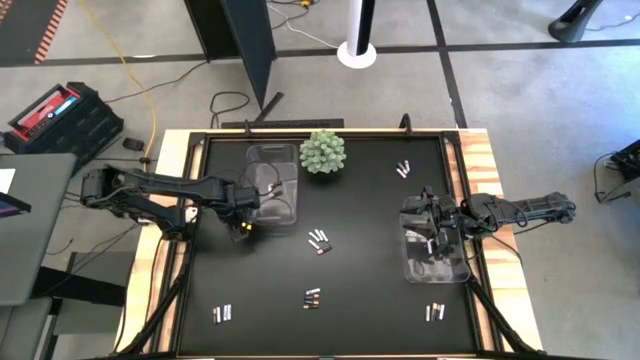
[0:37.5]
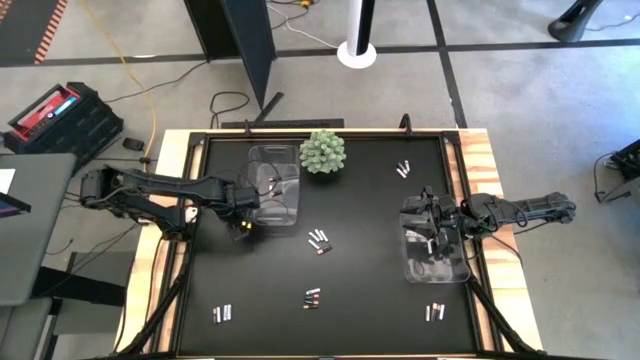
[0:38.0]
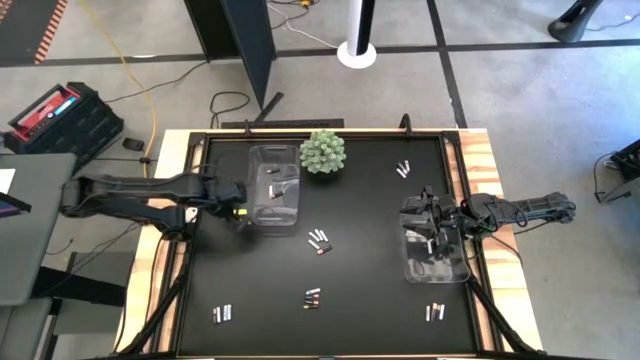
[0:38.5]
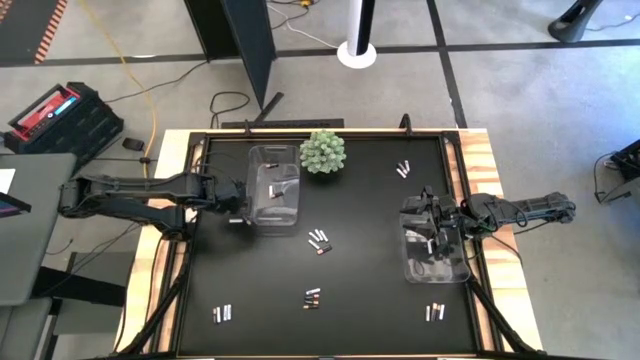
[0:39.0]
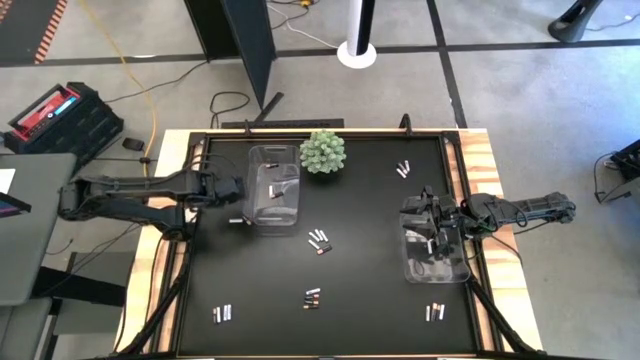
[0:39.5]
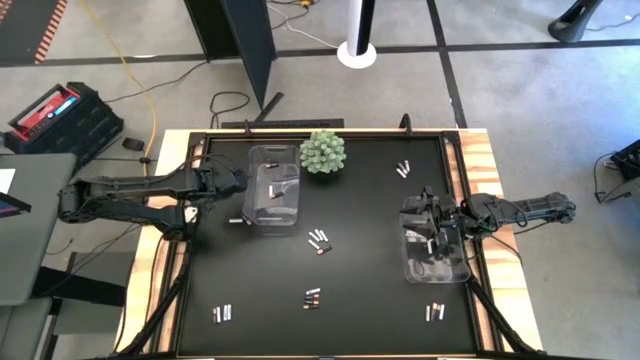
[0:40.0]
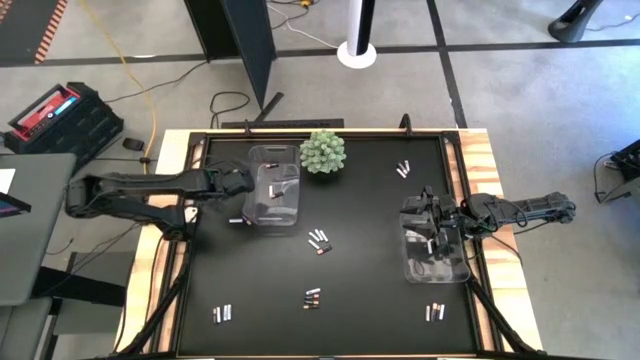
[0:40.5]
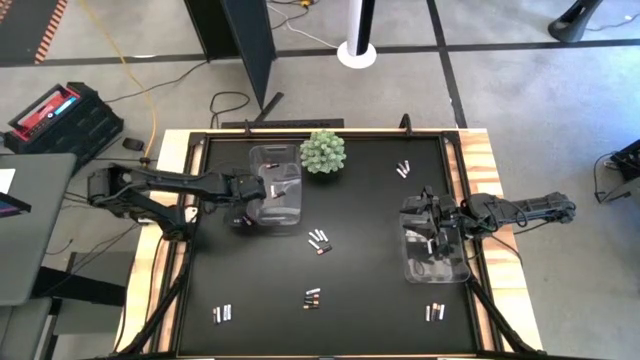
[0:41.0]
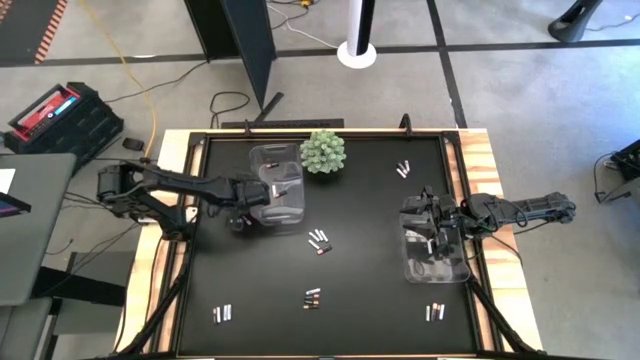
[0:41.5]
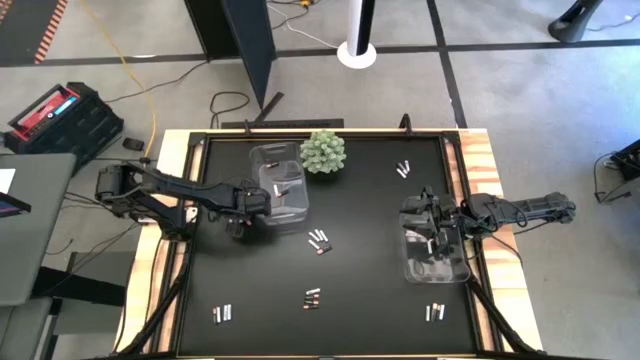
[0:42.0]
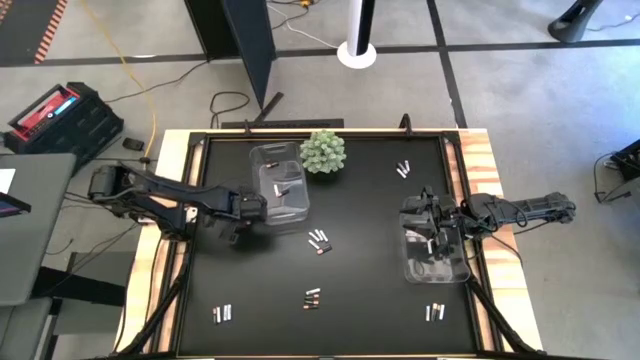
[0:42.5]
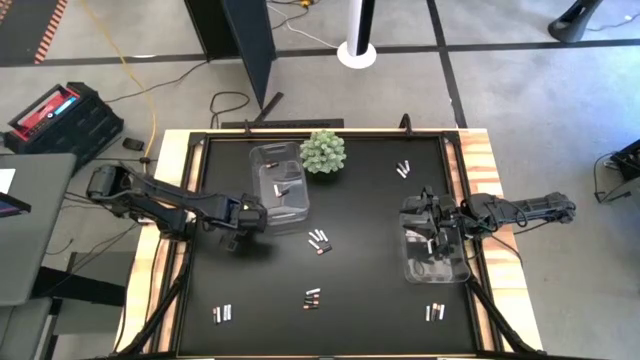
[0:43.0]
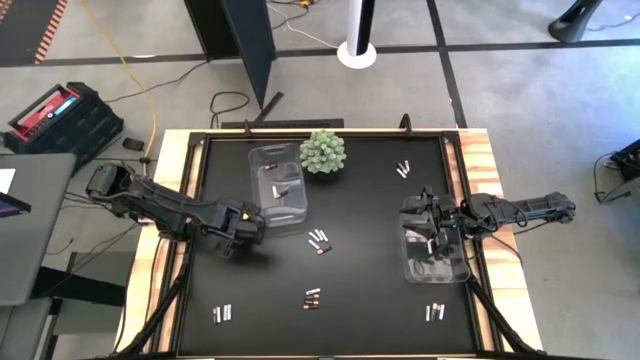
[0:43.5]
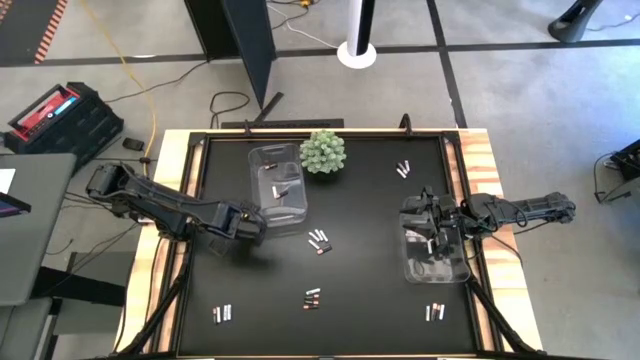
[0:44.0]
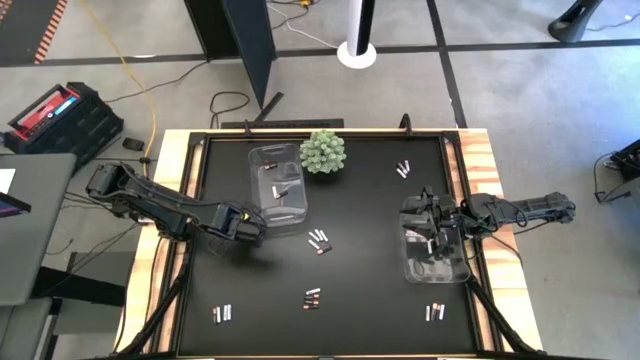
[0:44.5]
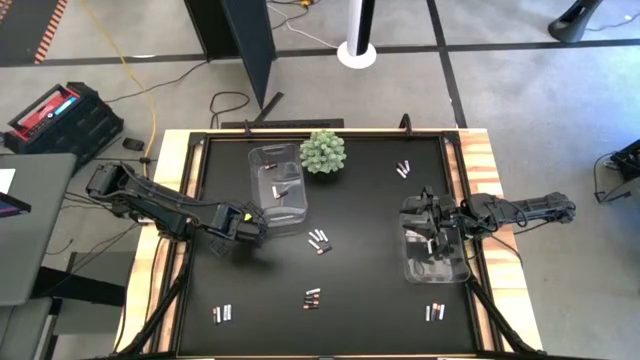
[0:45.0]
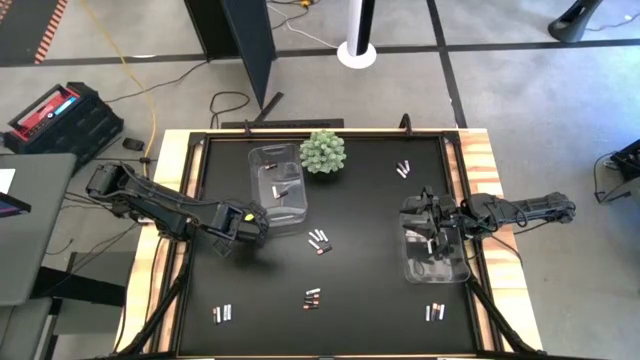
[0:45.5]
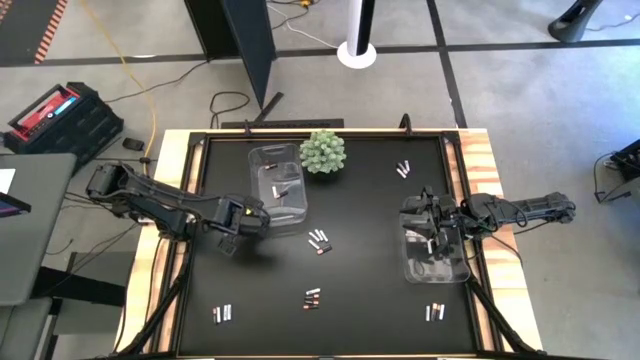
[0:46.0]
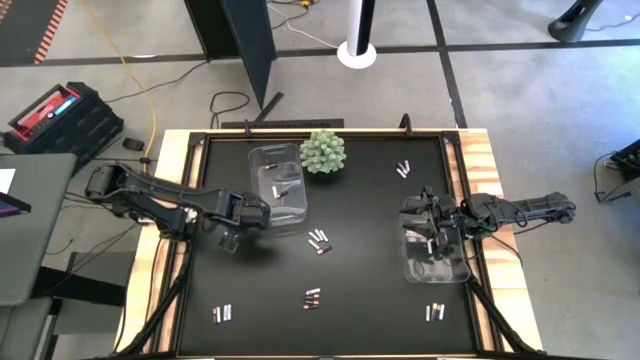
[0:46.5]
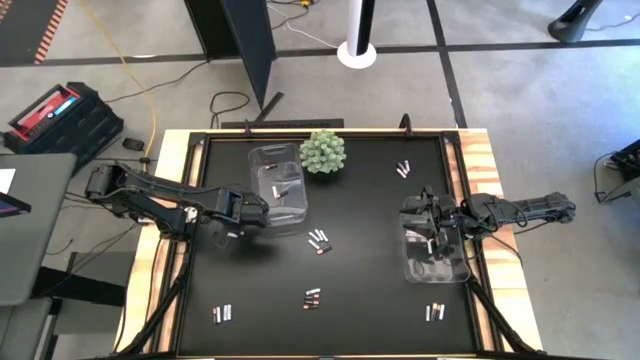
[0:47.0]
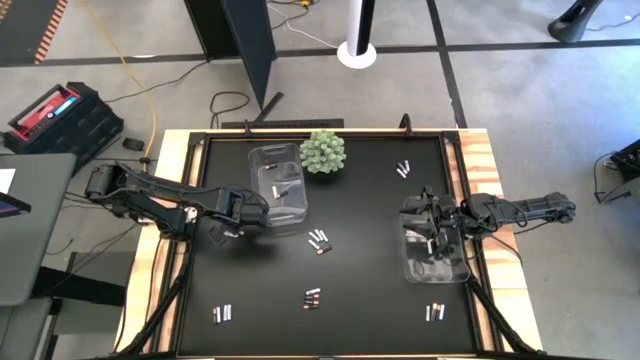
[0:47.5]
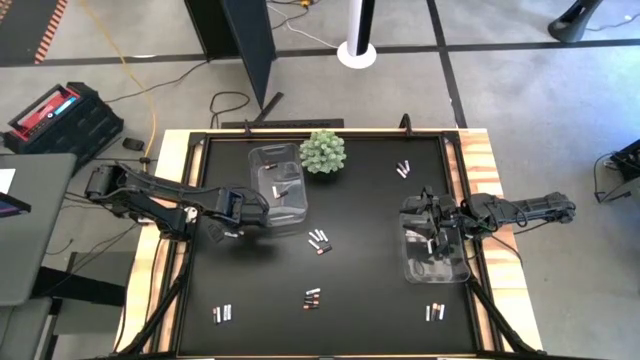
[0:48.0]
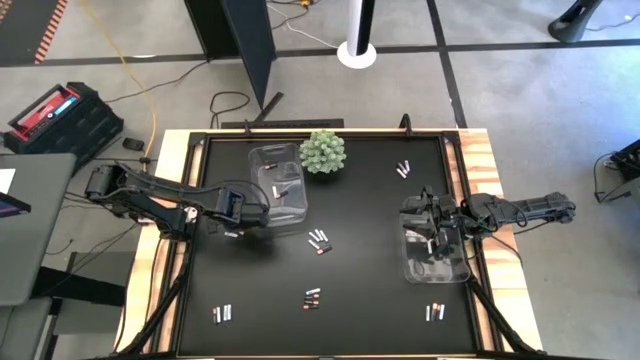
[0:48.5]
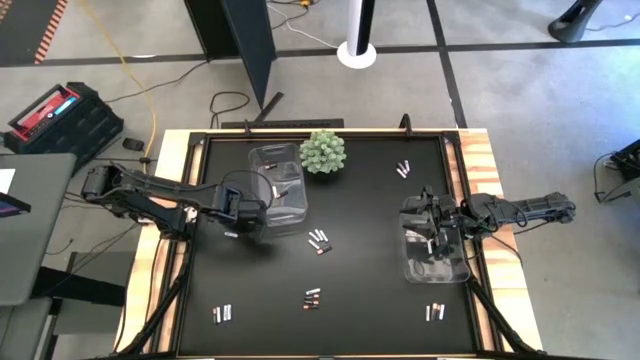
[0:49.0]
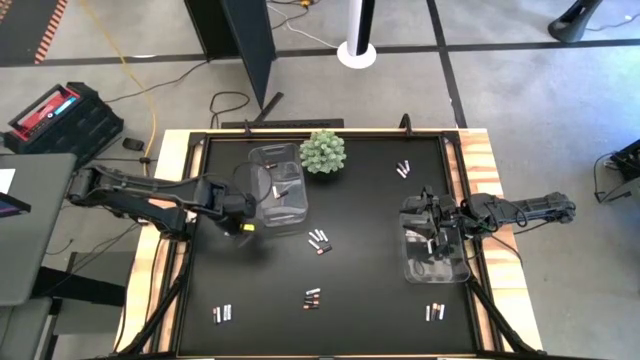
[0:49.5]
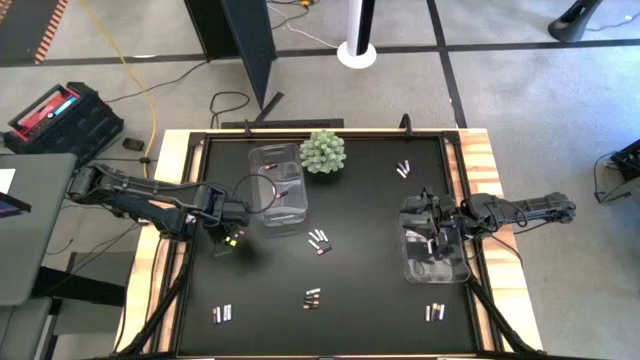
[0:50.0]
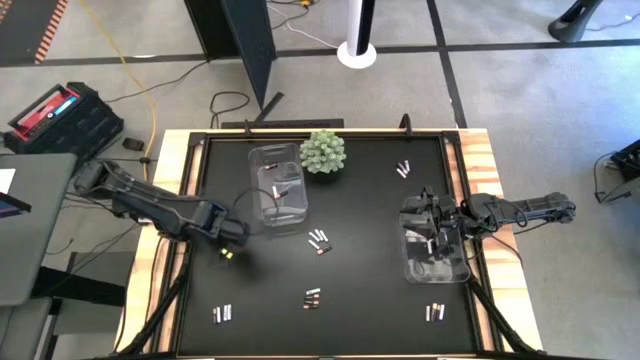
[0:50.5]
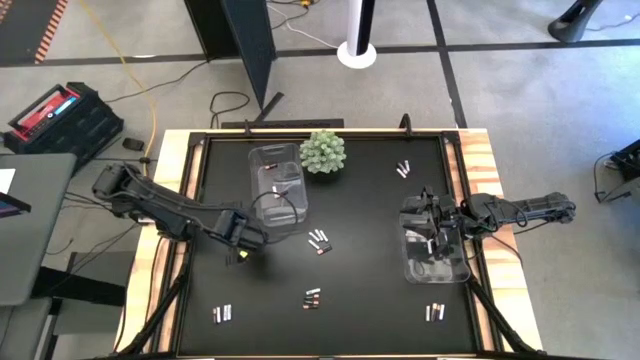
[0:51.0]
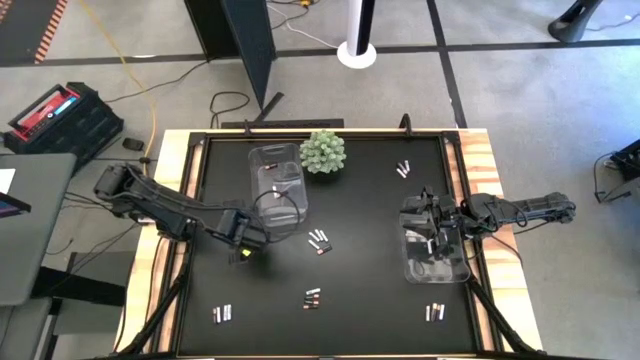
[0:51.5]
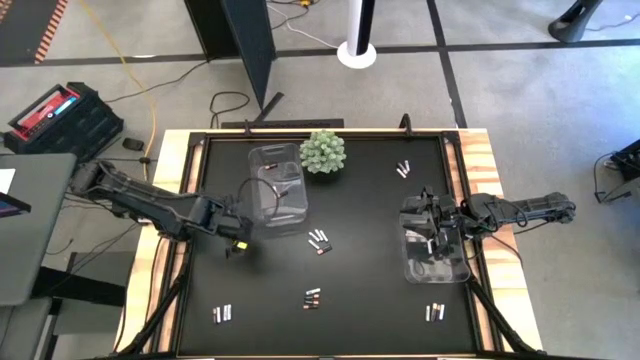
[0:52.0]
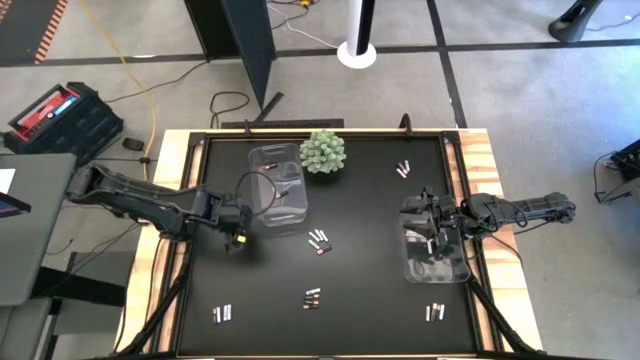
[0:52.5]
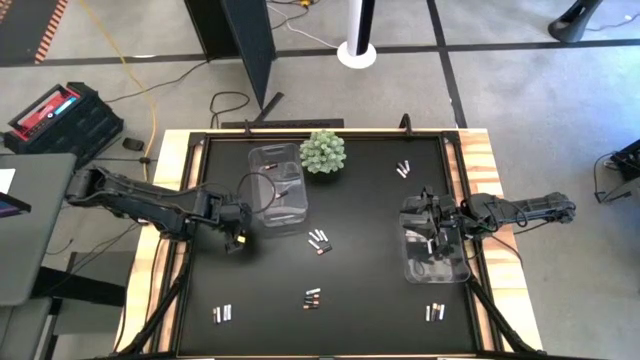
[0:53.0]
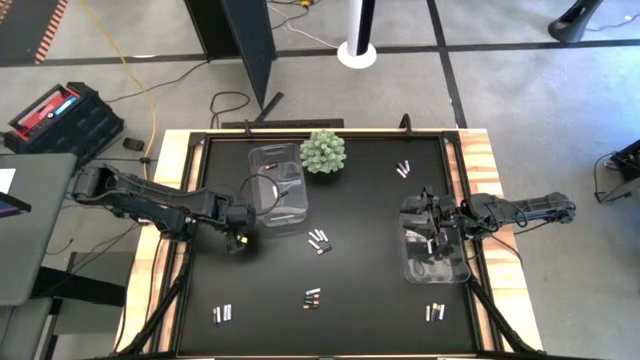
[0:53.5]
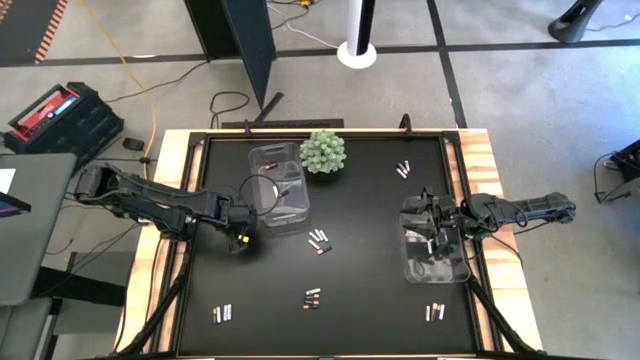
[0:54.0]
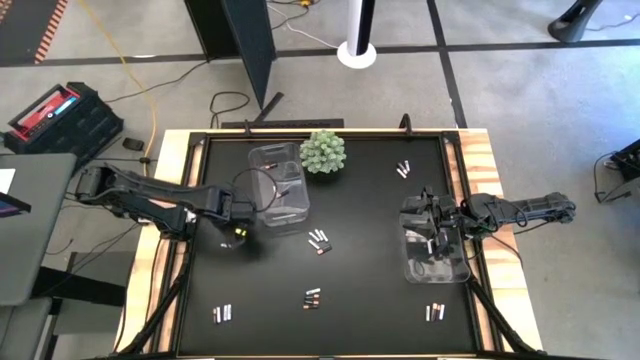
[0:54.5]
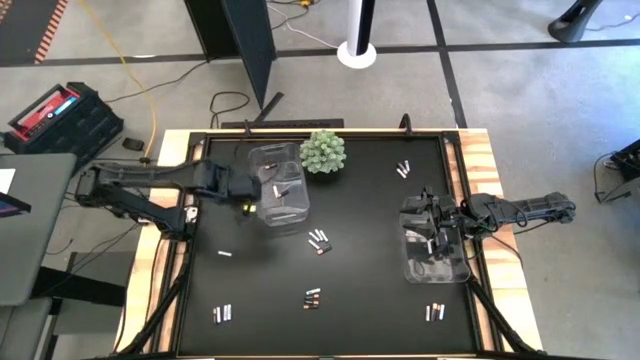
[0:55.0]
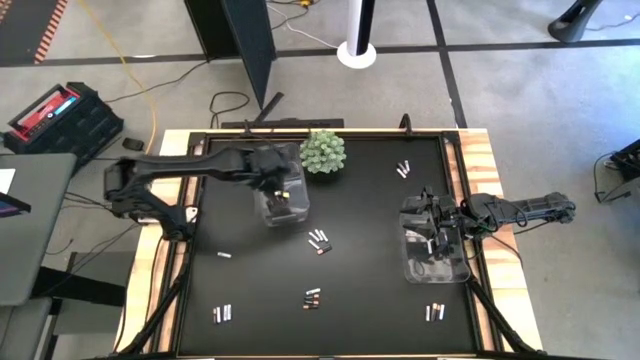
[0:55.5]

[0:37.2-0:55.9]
Task: Sort batteries
Put the black-brown battery into the left transparent bin

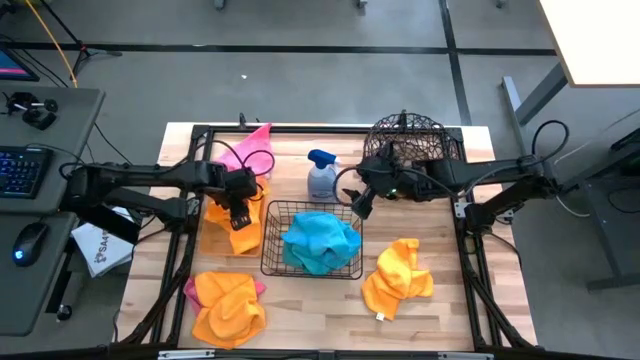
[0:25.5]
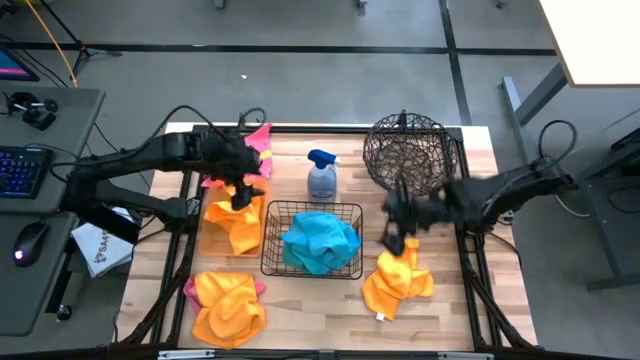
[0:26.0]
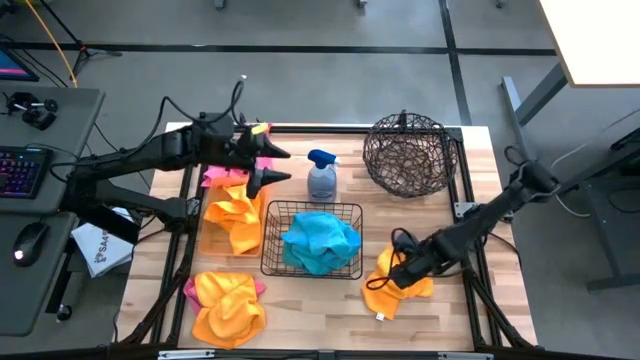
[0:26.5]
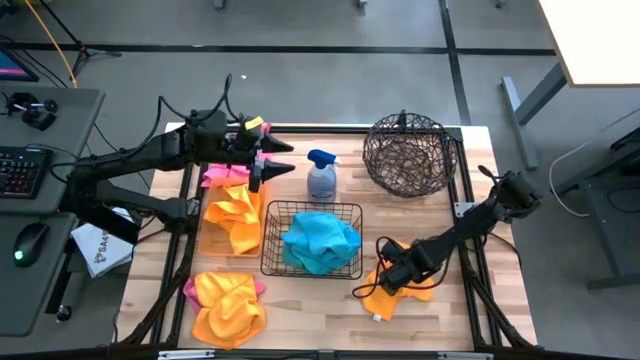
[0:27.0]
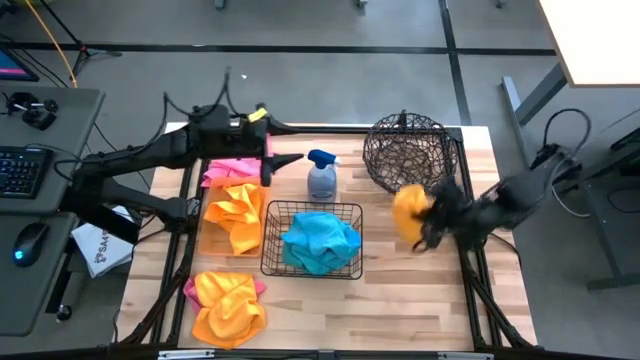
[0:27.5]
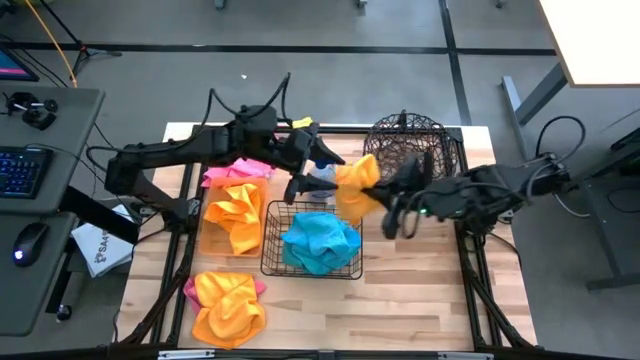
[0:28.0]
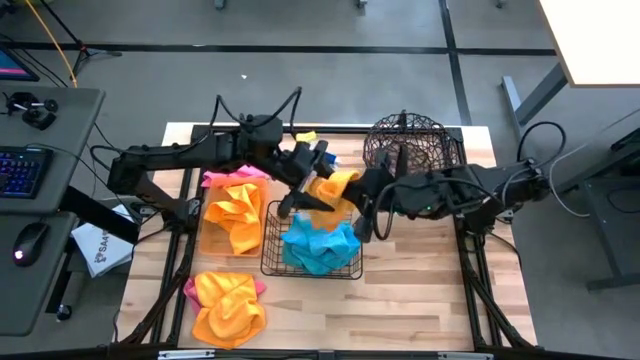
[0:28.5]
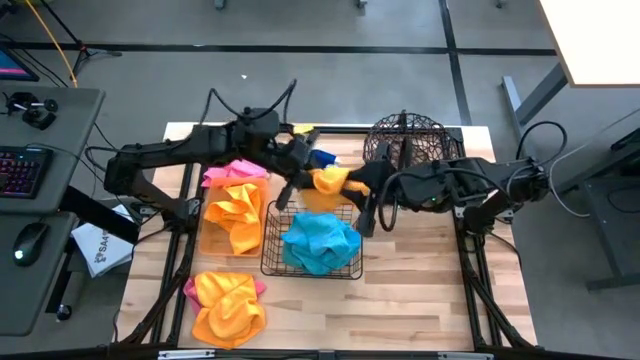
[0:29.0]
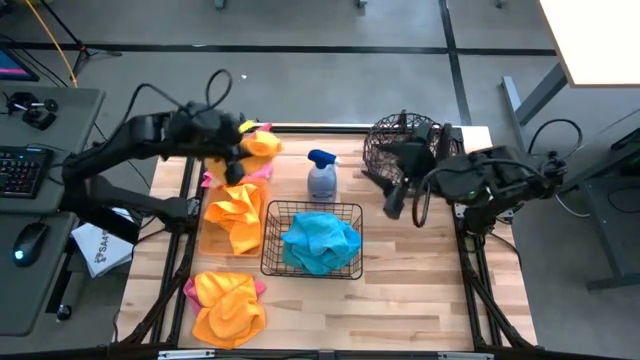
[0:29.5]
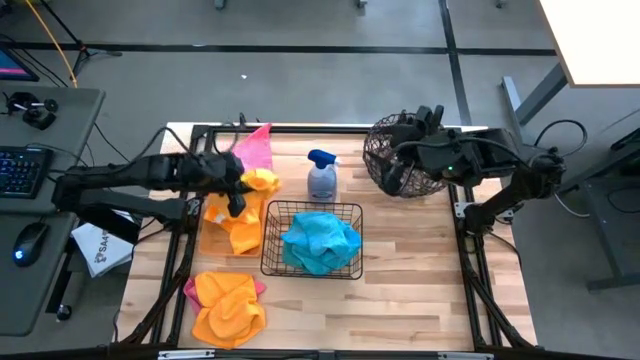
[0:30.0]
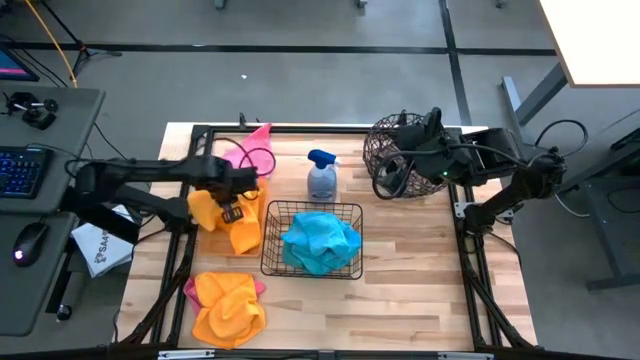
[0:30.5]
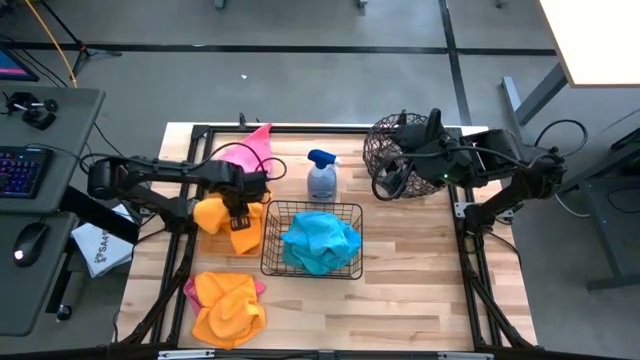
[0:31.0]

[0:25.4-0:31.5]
Task: Sort microfiber towel by color & place in baskets
Put the right yellow towel into the orange bin
